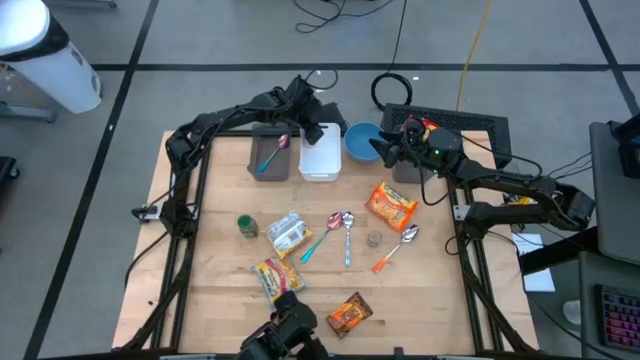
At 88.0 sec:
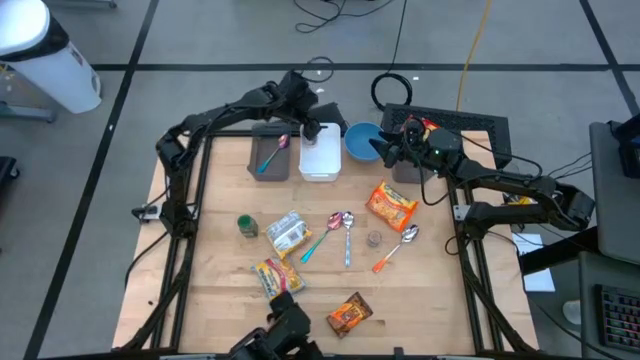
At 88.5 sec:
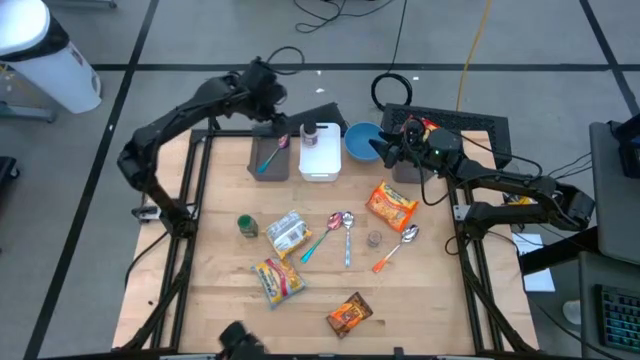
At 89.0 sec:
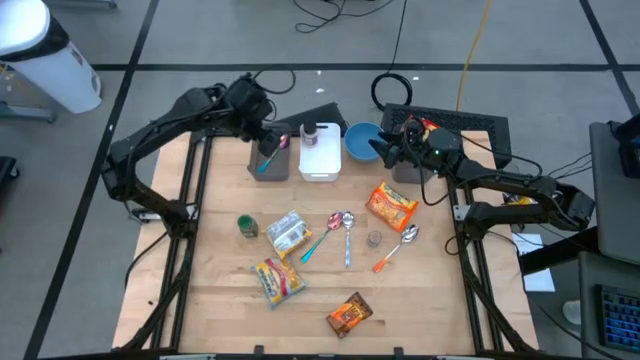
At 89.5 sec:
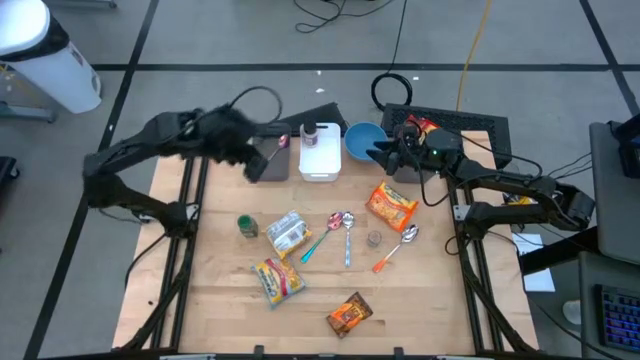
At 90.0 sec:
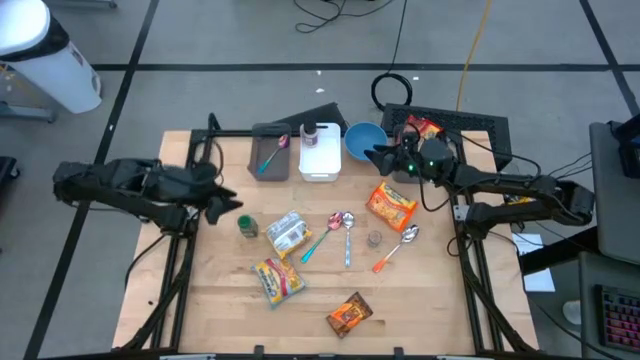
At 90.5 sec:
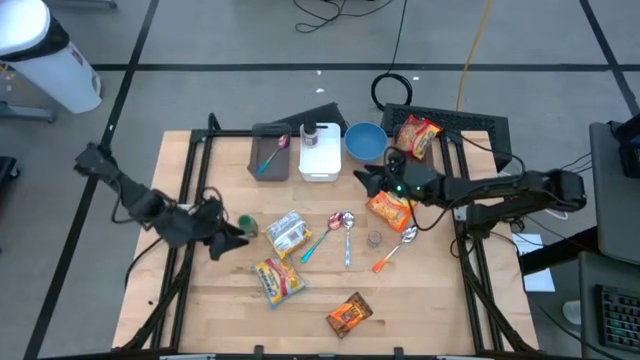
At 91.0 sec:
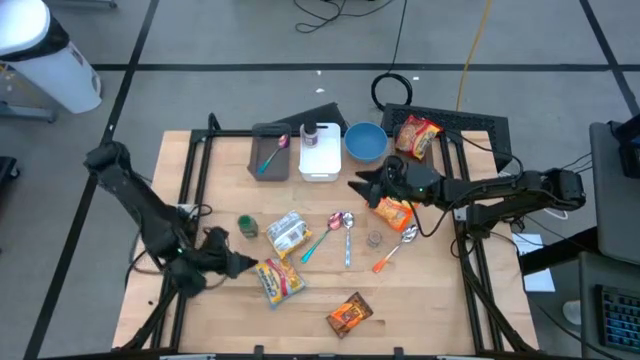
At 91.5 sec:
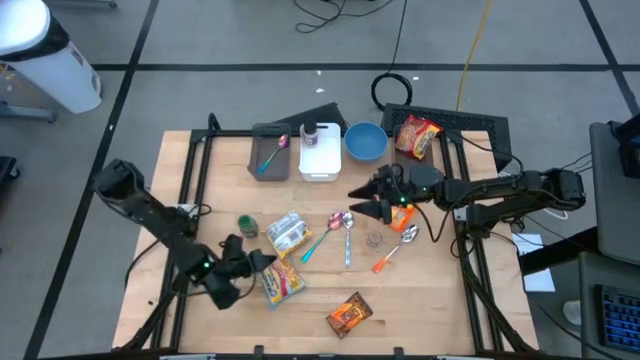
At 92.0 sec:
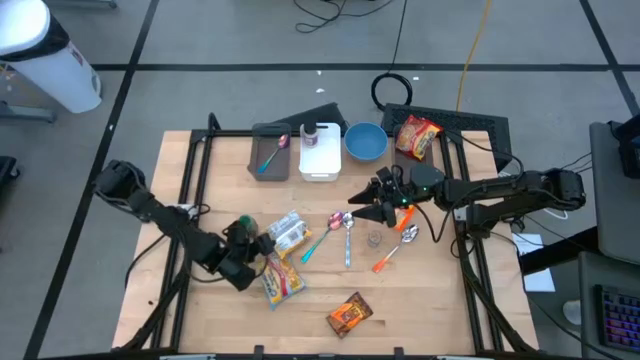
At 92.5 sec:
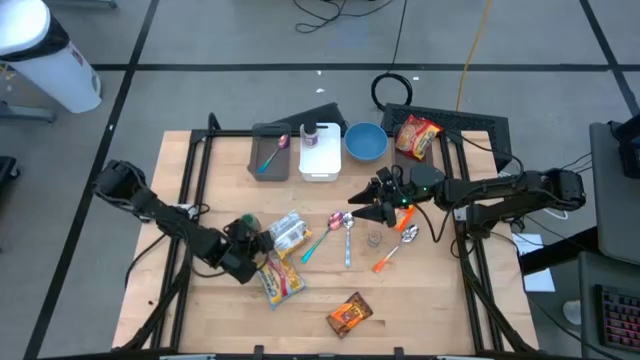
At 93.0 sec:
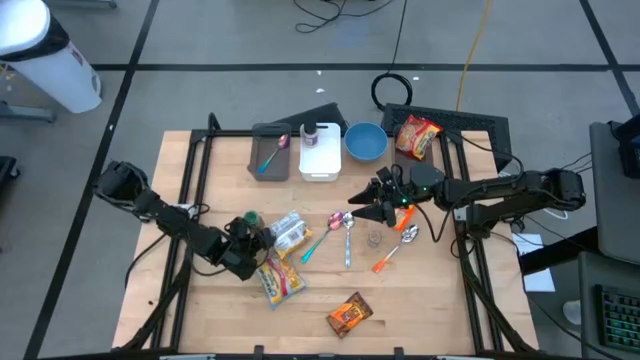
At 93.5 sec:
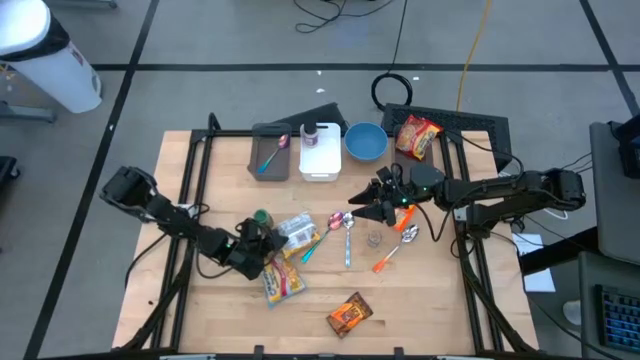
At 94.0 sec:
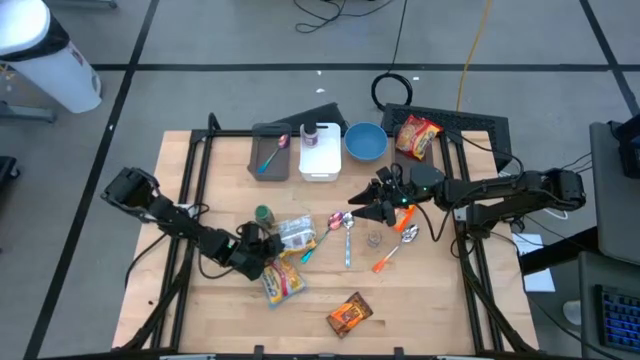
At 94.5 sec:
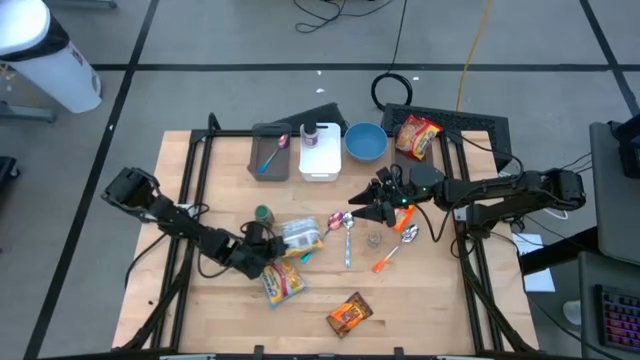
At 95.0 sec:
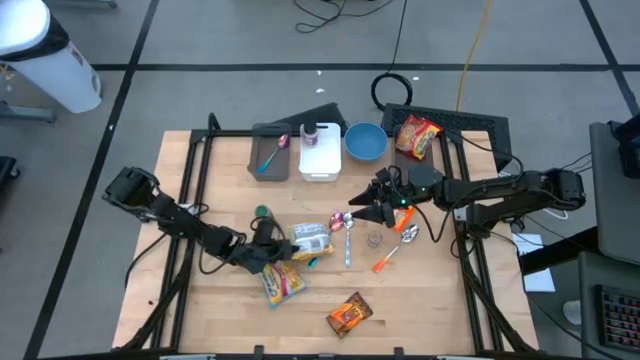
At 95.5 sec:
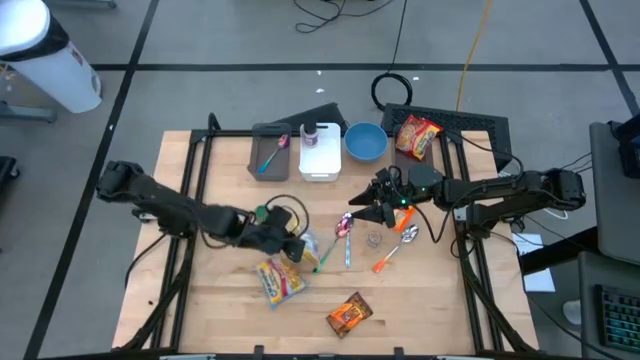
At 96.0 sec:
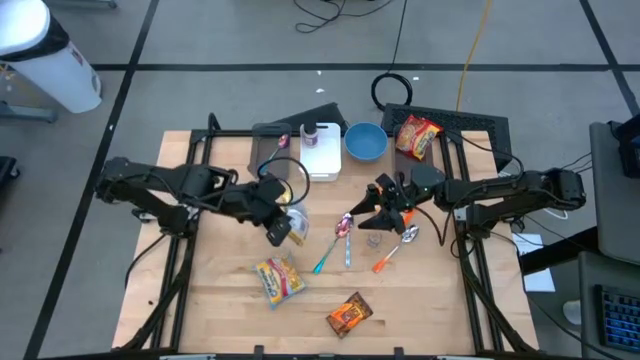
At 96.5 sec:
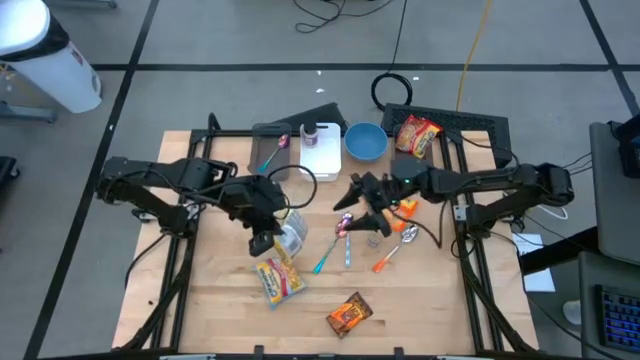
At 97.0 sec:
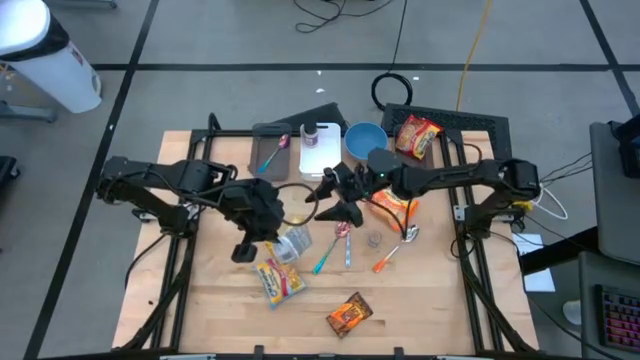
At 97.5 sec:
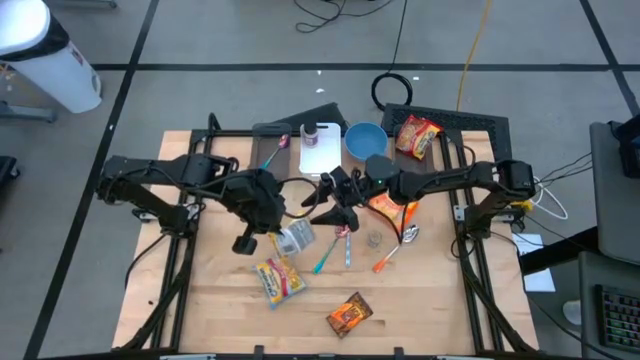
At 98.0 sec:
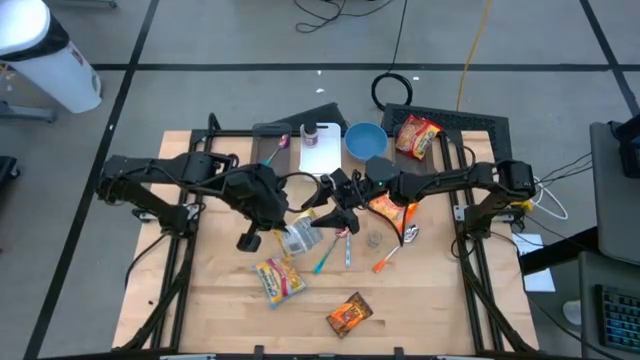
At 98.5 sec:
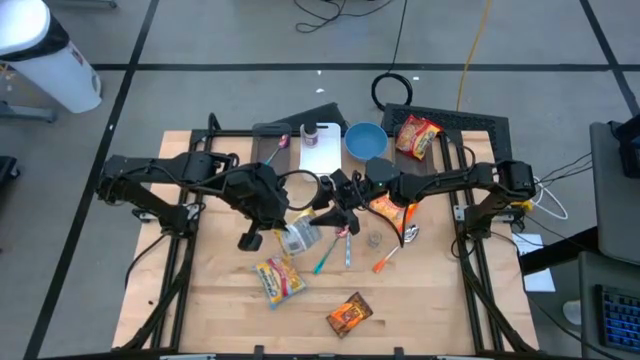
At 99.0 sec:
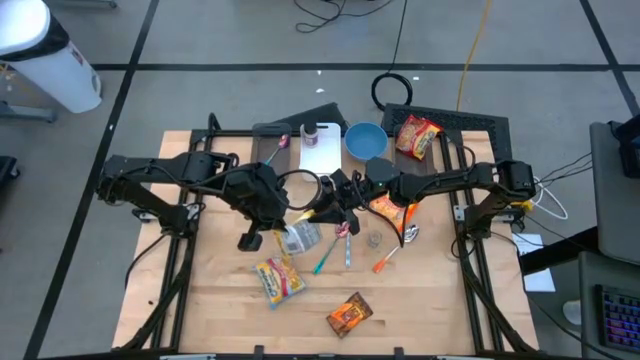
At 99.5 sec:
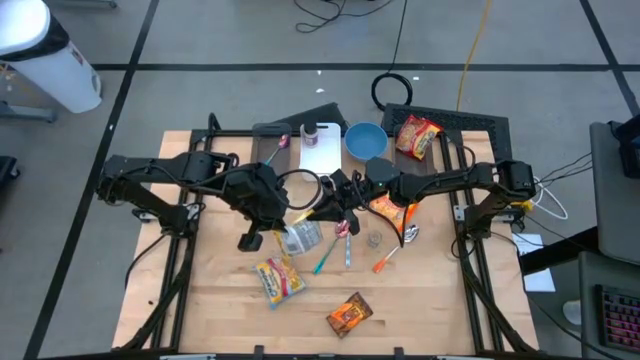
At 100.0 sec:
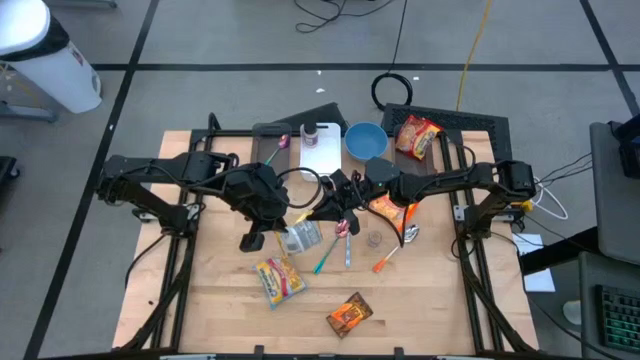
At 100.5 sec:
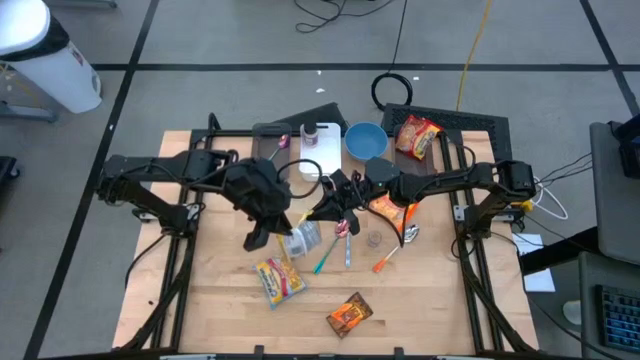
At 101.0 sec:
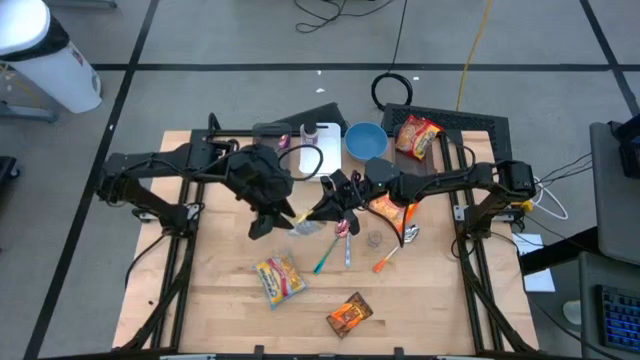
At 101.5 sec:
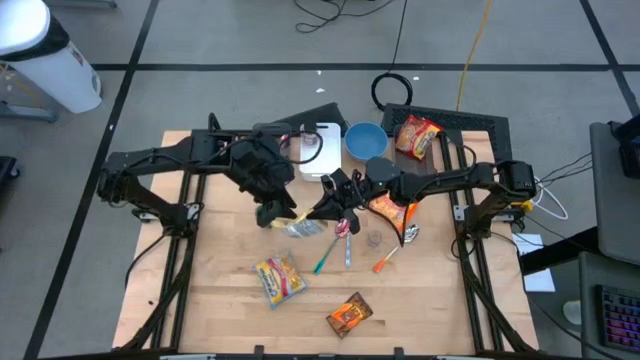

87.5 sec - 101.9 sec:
Task: Pick & Place Food Item
Put the yellow noodle pack into the right black bin

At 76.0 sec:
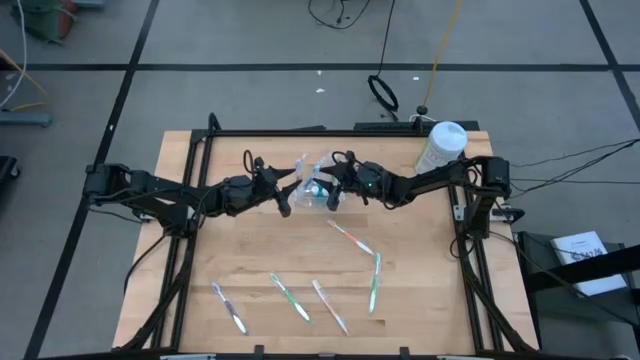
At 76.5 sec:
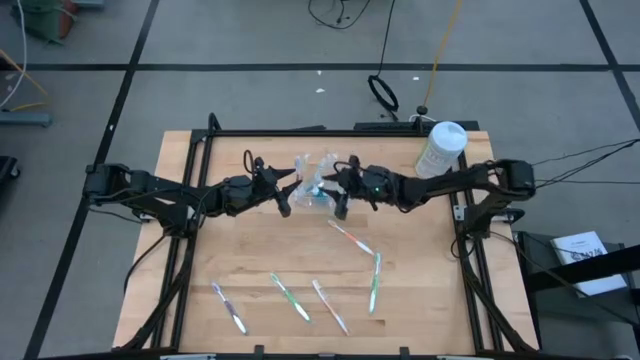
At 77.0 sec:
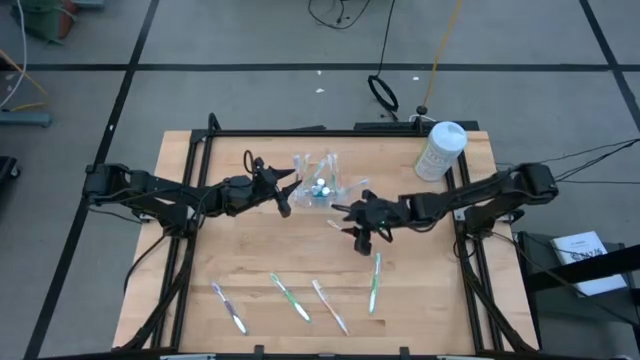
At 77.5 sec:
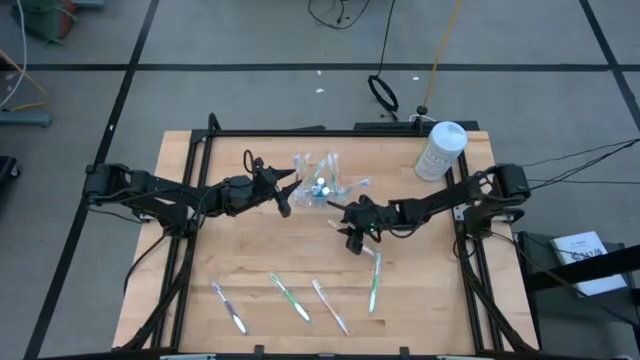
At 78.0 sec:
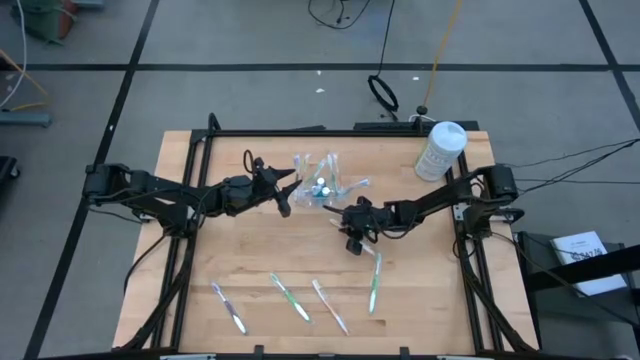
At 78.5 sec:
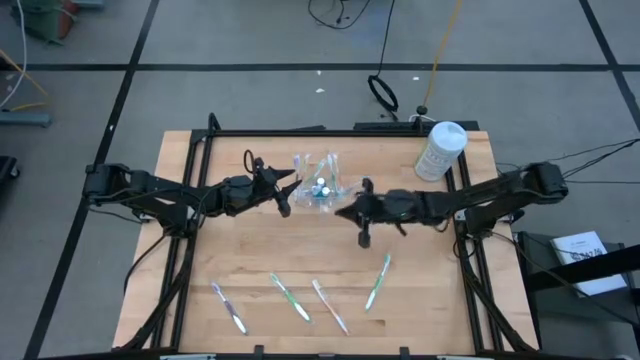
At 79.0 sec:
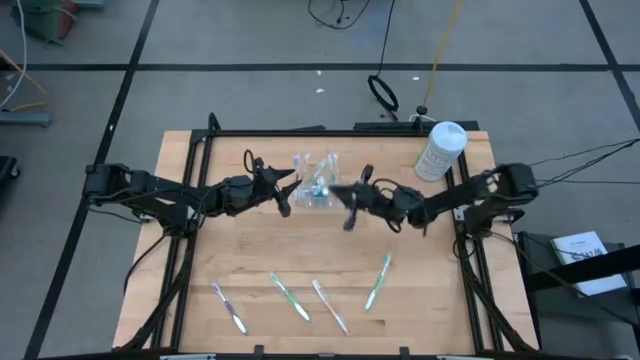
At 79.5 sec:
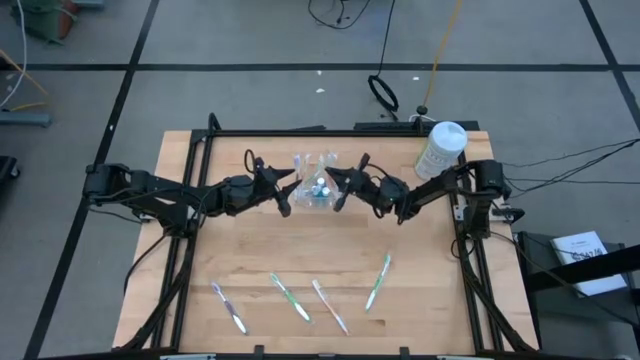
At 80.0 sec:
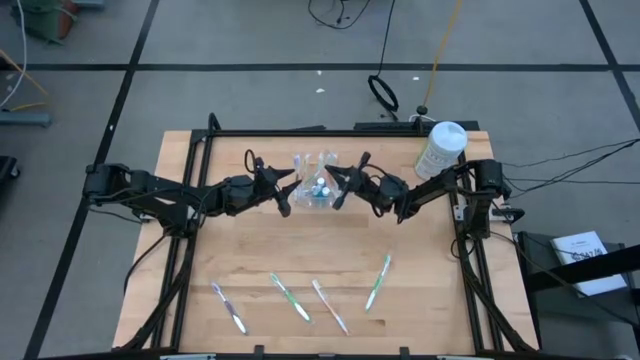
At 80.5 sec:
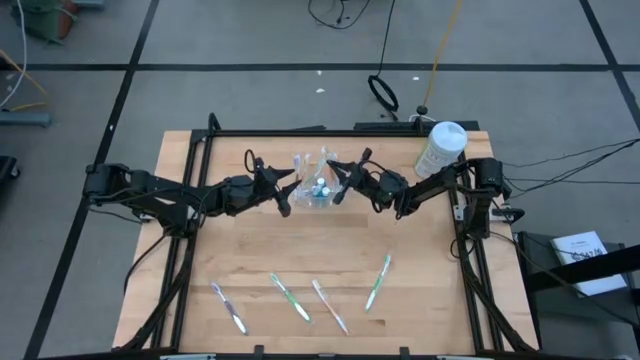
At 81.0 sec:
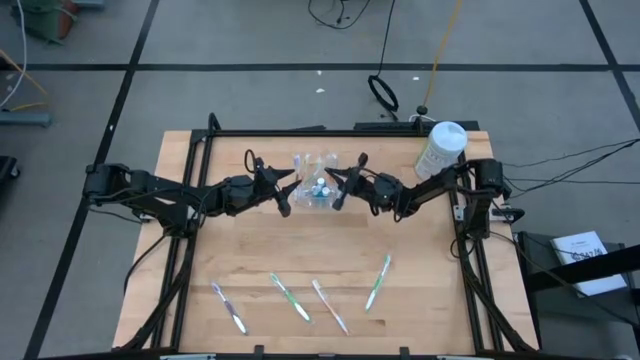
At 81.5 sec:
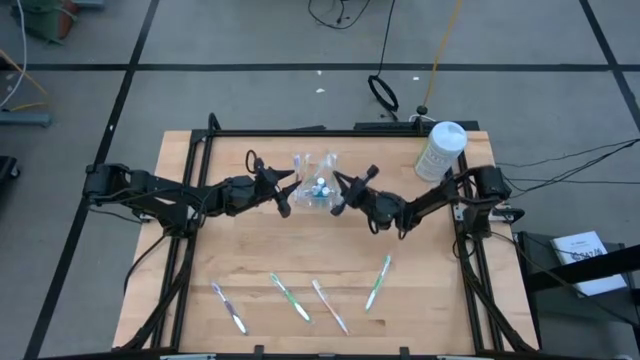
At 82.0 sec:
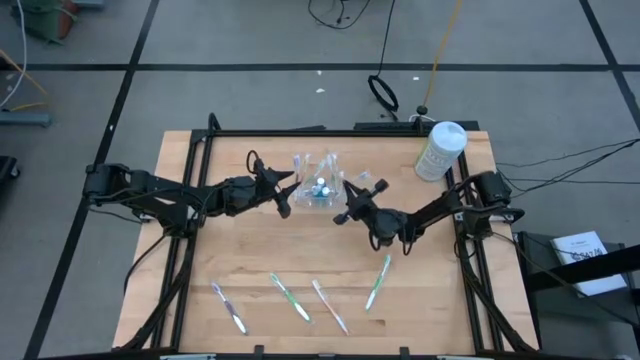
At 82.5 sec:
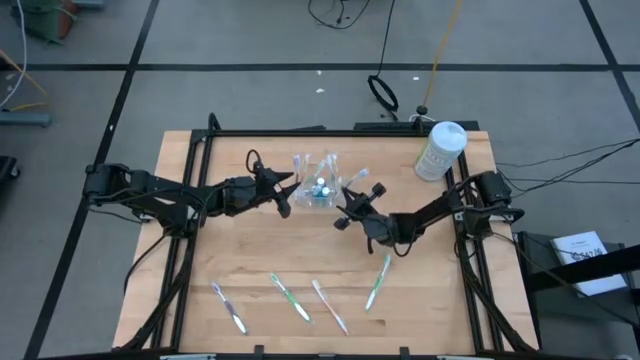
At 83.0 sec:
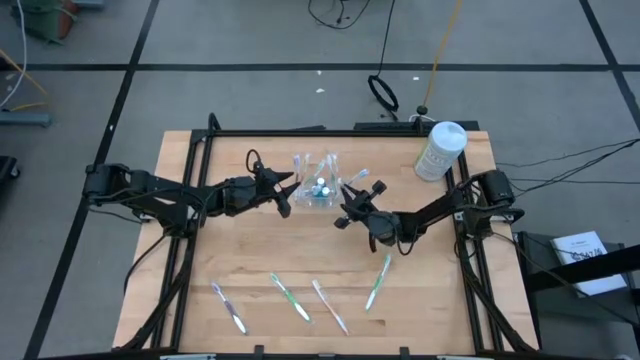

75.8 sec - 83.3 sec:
Task: Pick & Place Toothbrushes
Put the orange toothbrush into the transparent organizer
